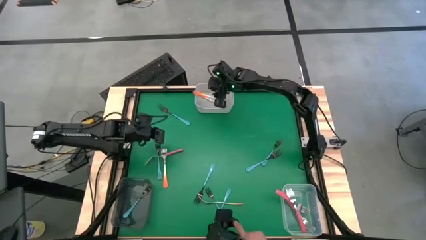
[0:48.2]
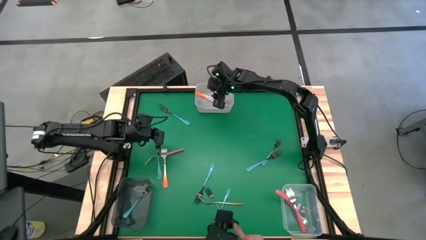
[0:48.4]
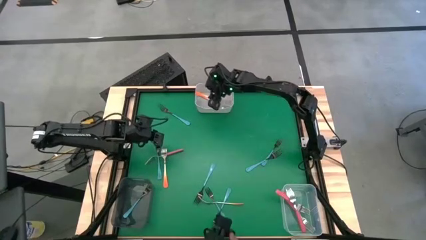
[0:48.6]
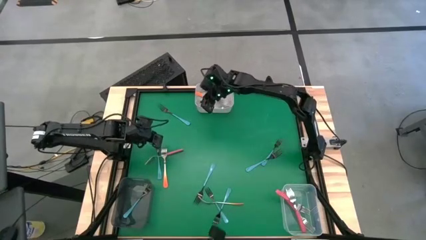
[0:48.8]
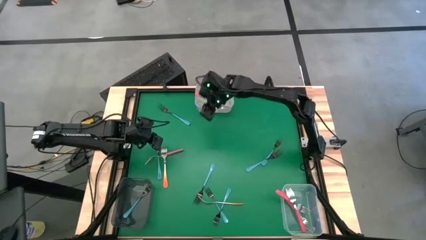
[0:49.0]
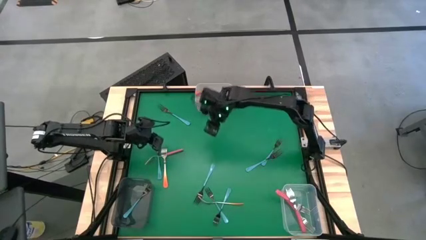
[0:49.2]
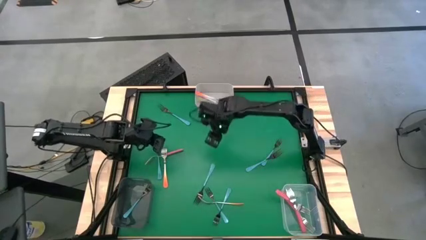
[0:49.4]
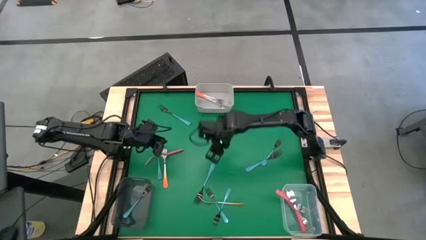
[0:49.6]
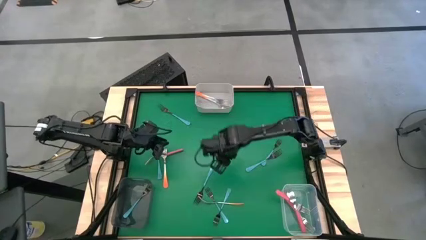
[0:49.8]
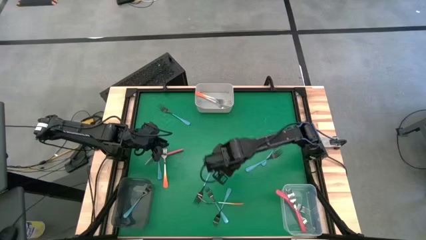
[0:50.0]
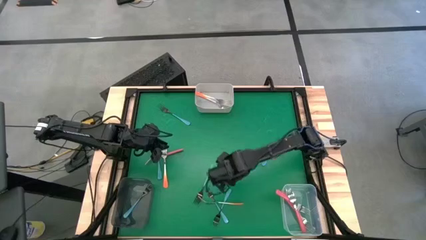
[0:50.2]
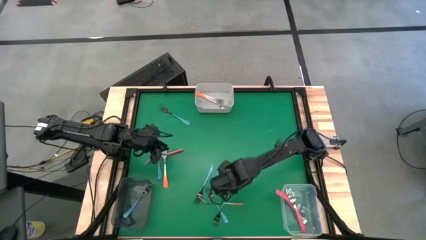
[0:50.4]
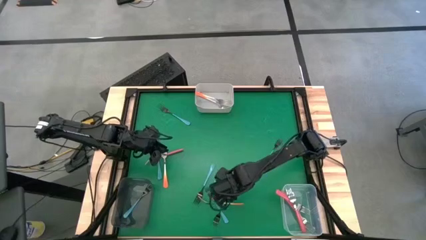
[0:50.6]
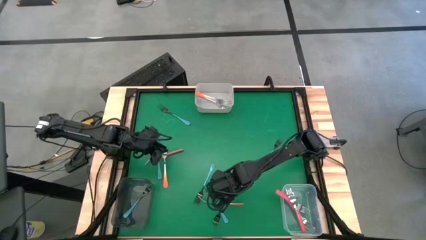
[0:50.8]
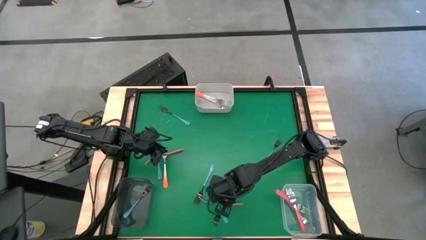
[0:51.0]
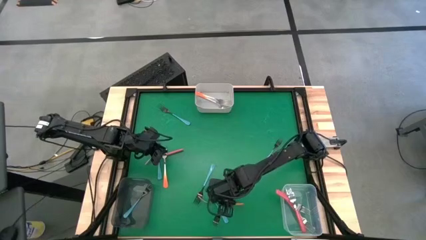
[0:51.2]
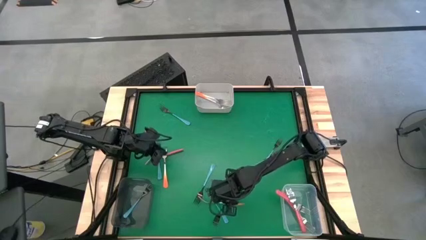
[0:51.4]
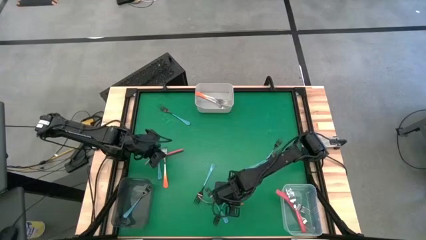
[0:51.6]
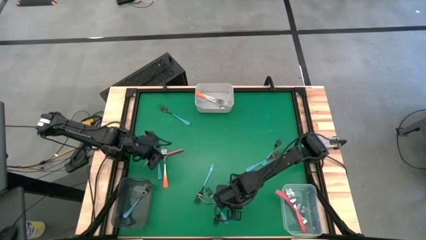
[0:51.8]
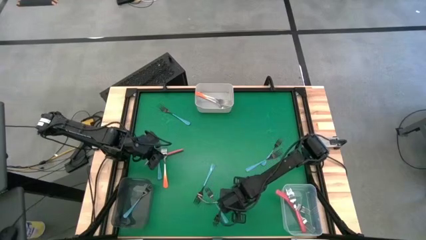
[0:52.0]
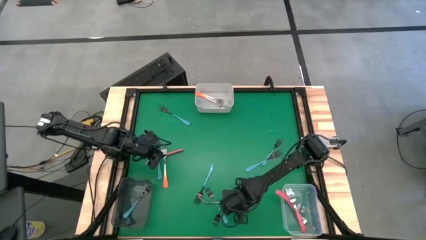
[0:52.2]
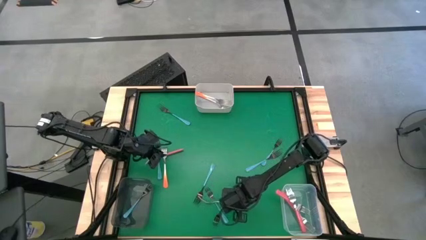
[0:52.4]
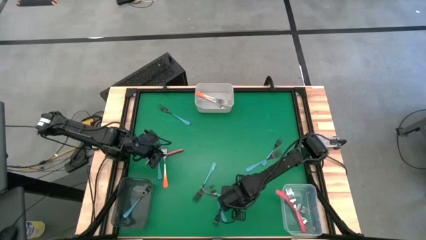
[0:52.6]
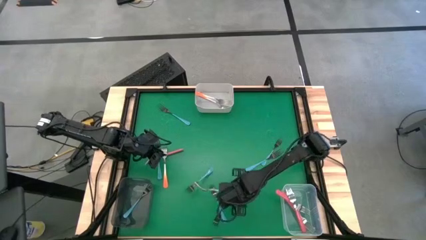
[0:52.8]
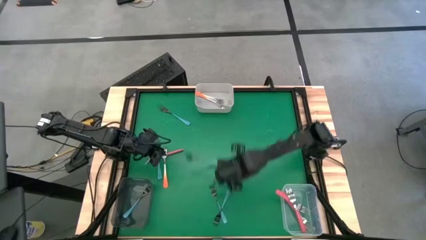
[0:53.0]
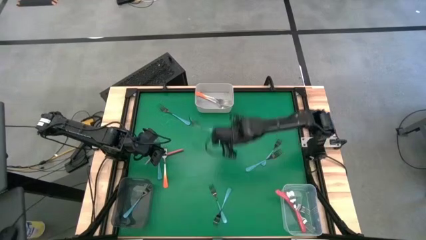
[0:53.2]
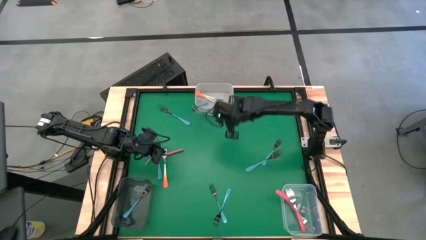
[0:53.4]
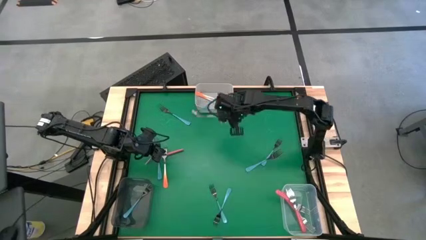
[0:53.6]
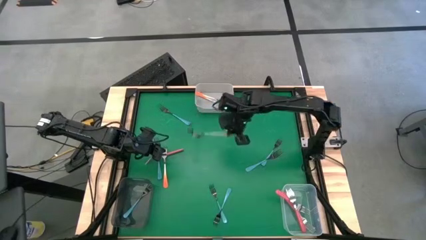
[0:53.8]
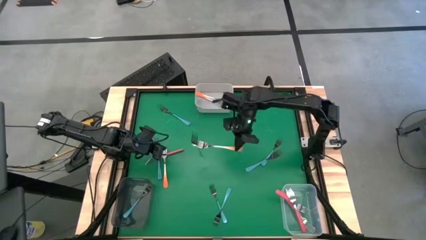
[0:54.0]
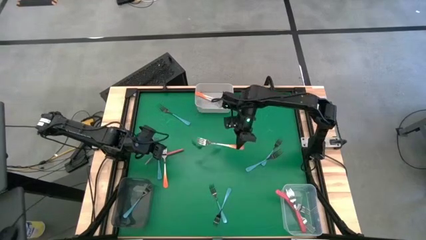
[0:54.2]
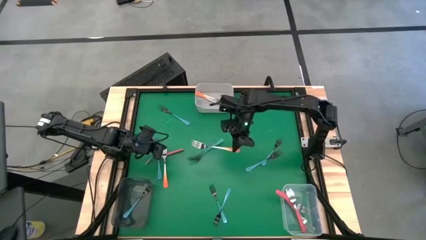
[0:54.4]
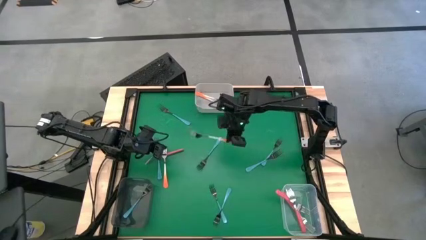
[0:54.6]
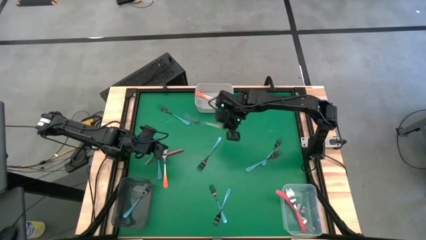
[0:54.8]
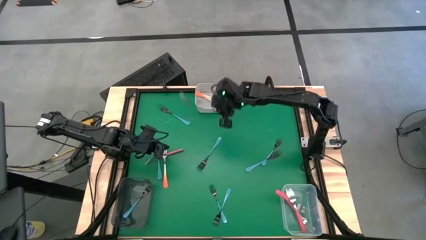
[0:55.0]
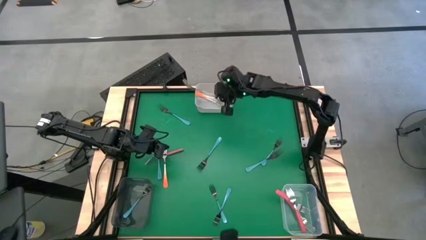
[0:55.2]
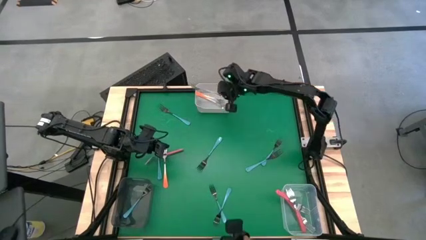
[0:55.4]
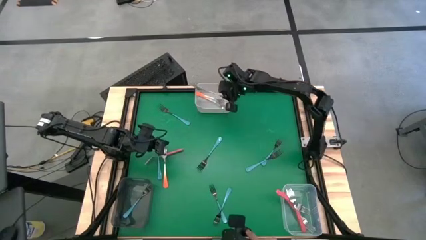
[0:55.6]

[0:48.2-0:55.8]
Task: Sort silverware by color (type)
Put the orange fork into the white bin

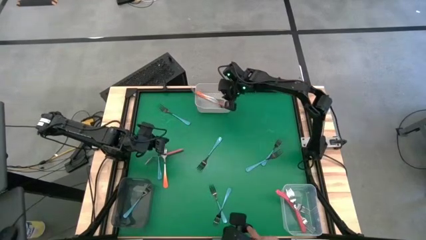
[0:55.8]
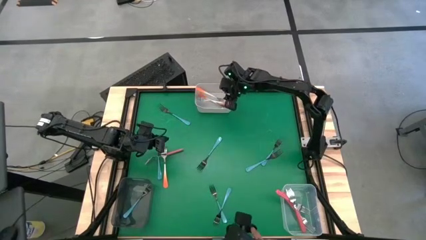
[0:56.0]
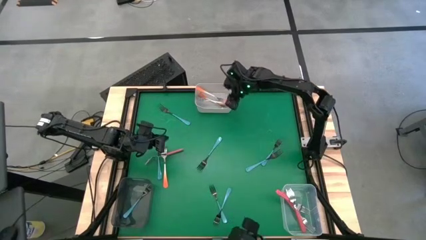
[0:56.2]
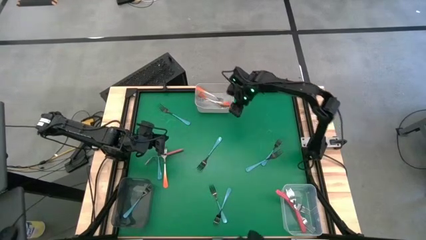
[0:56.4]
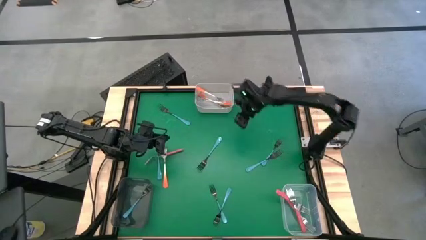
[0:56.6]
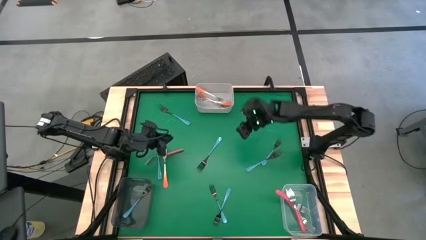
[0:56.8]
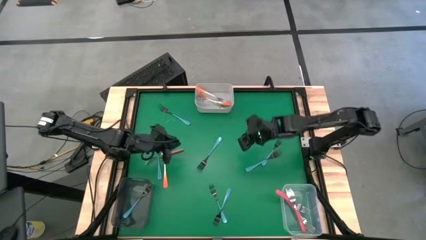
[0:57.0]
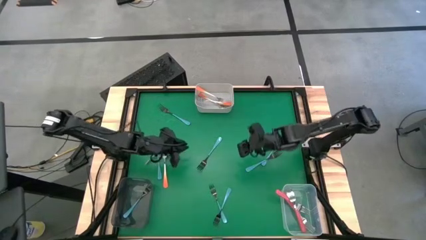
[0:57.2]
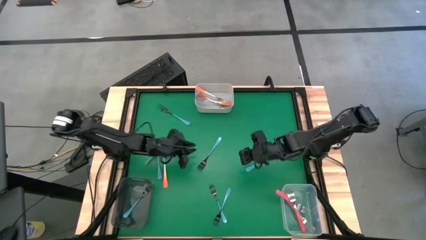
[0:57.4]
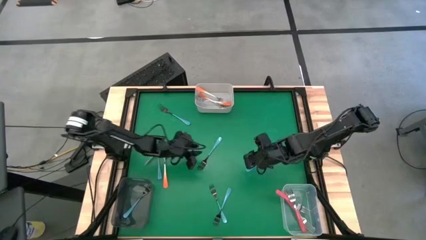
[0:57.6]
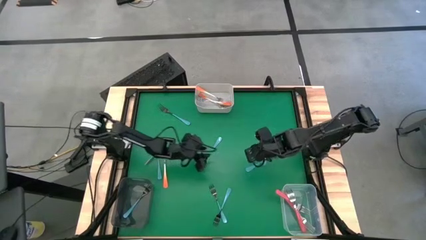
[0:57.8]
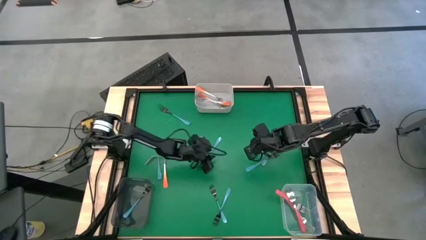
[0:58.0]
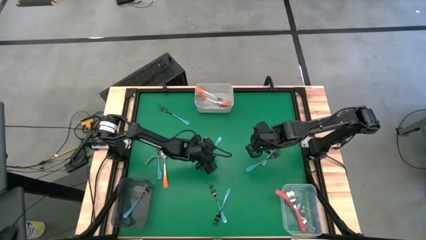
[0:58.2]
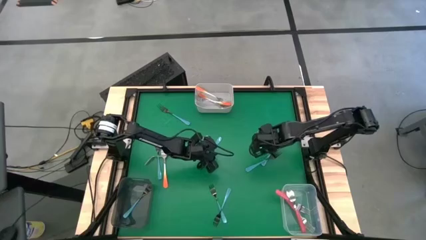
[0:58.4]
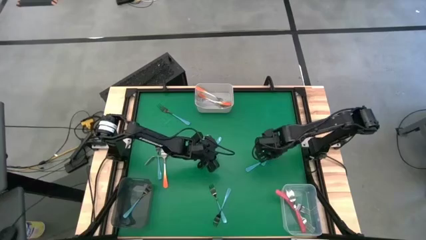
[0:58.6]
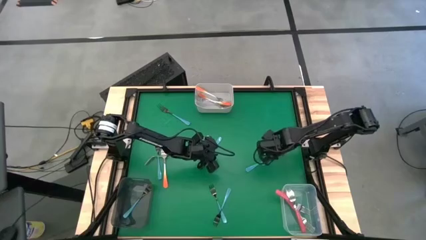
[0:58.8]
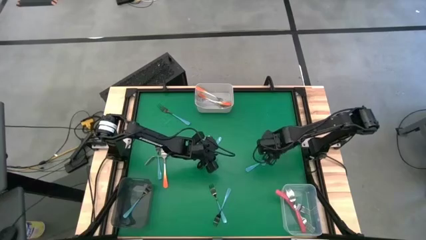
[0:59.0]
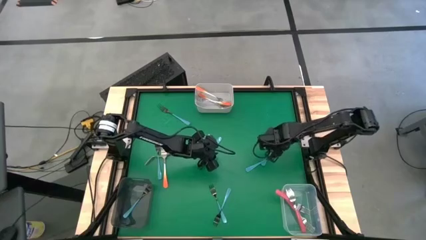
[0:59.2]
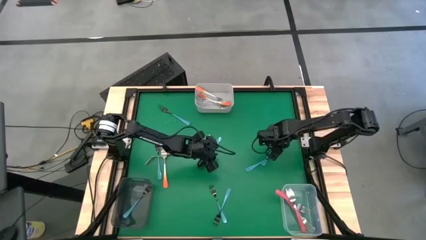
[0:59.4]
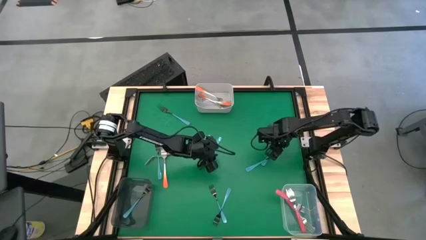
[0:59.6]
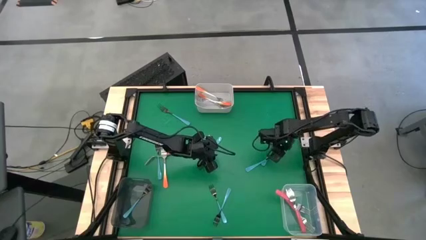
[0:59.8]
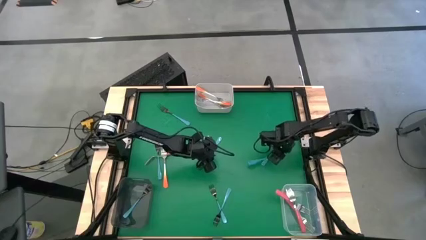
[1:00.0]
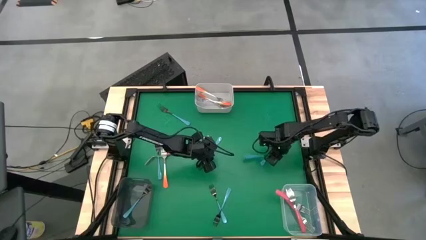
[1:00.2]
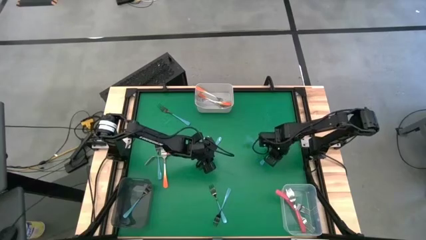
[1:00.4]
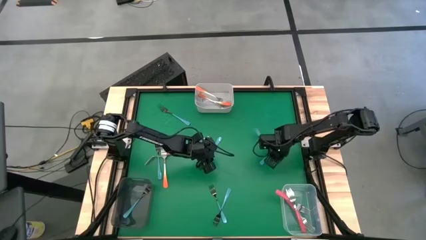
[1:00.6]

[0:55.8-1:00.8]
Put the blue fork into the black transparent bin

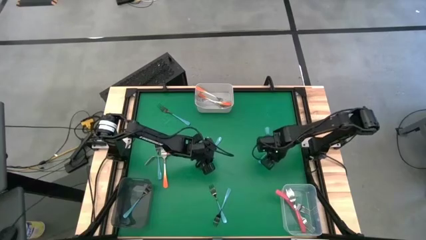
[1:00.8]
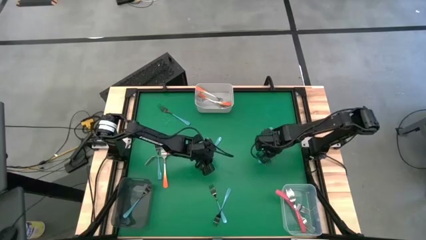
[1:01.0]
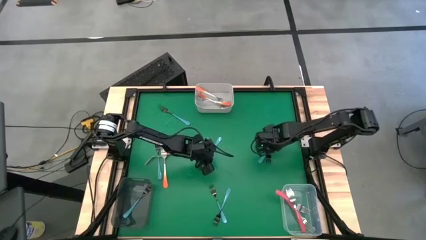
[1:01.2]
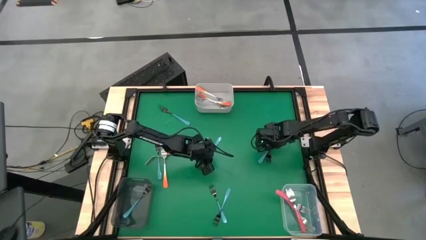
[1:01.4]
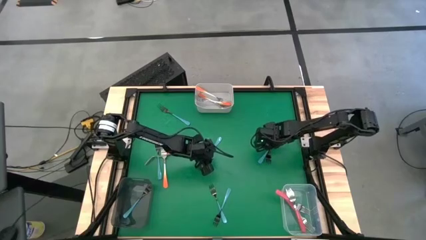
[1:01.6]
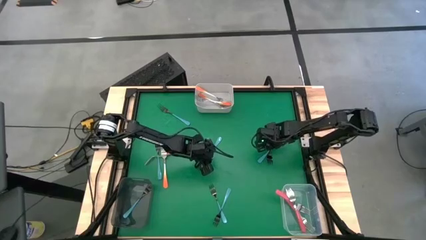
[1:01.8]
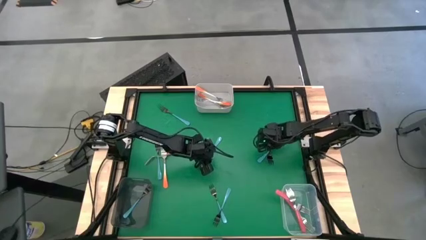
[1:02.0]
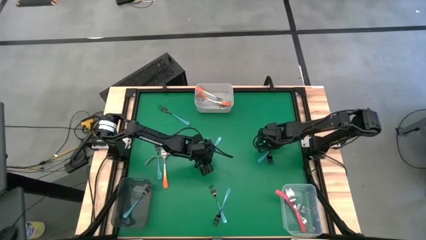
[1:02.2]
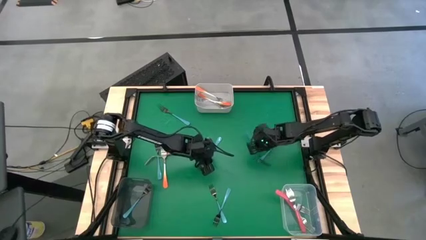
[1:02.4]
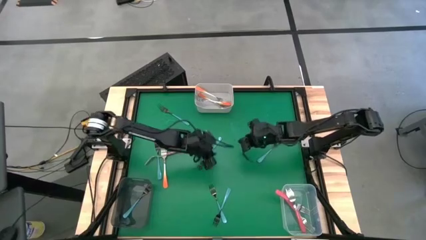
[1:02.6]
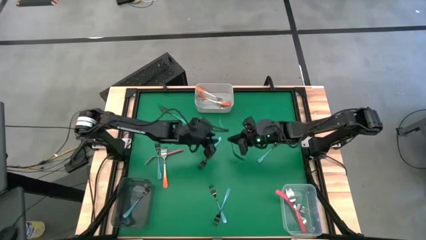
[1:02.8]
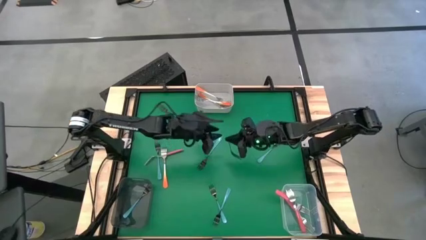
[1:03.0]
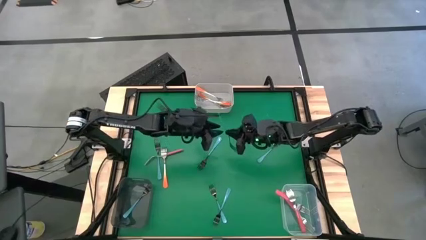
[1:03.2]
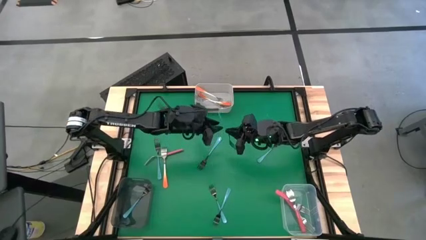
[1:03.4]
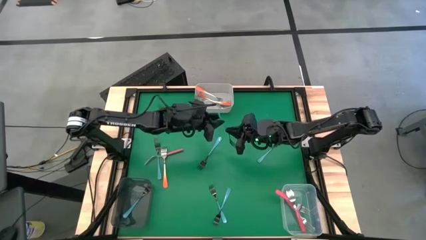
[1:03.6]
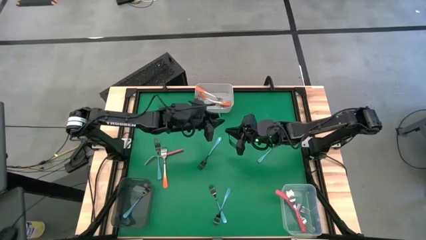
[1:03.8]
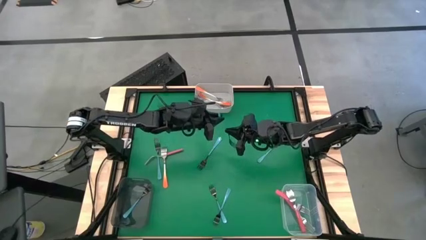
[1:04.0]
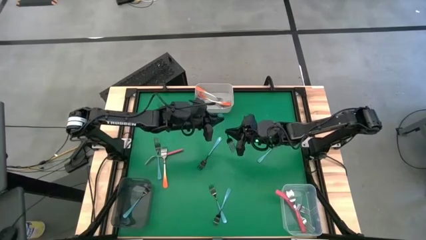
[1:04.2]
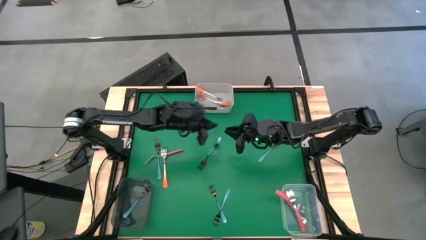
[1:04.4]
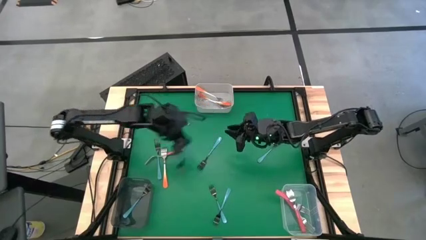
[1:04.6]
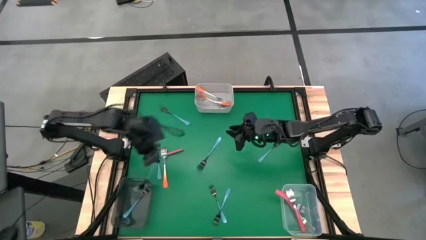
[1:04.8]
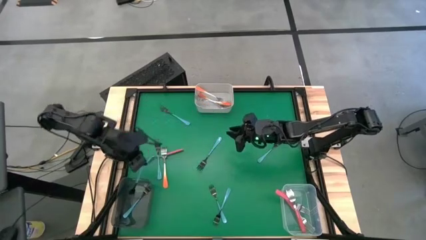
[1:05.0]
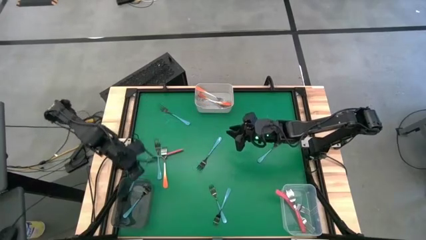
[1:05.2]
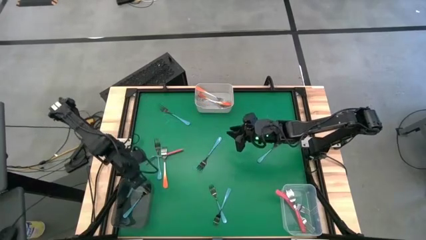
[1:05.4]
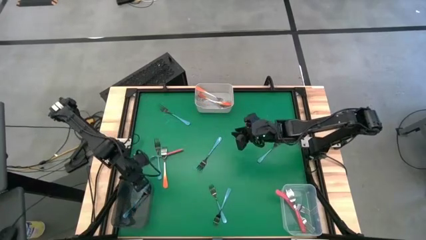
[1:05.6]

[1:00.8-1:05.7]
Put the blue fork into the black transparent bin
